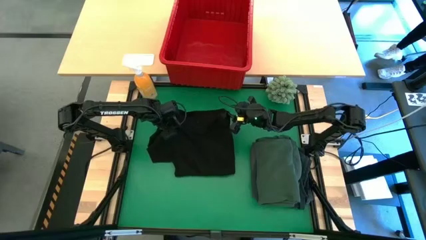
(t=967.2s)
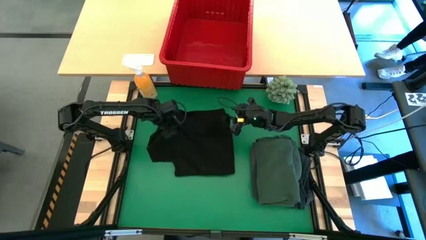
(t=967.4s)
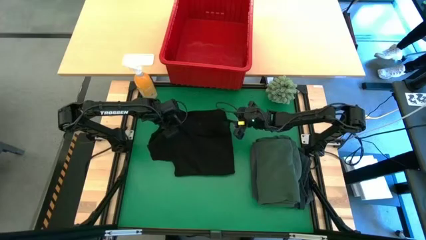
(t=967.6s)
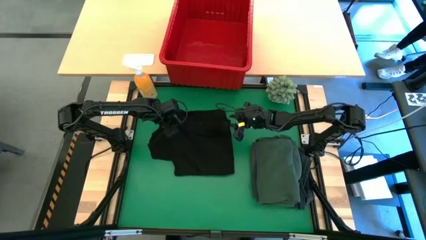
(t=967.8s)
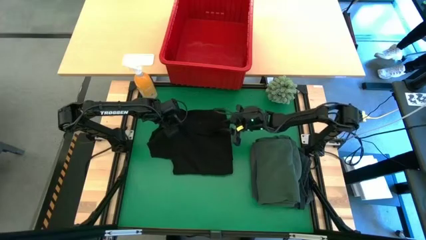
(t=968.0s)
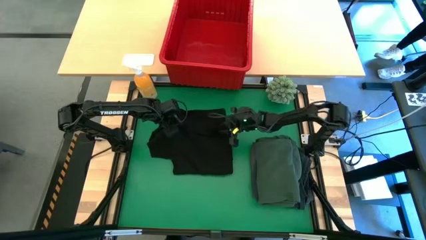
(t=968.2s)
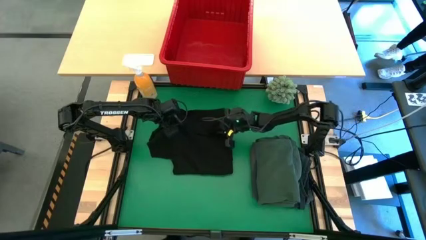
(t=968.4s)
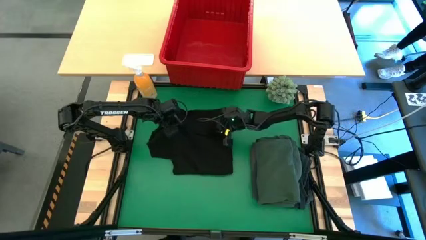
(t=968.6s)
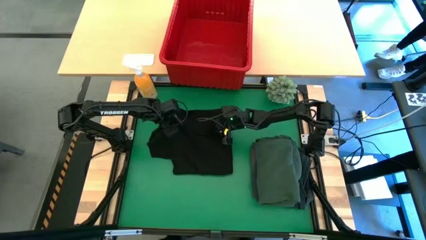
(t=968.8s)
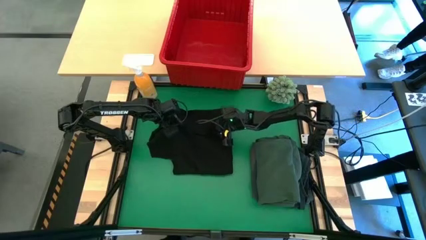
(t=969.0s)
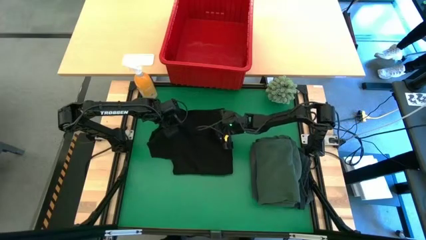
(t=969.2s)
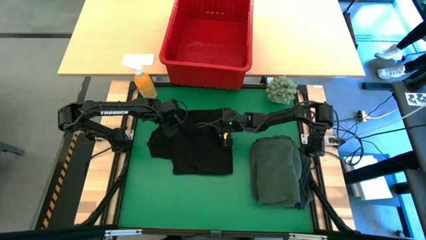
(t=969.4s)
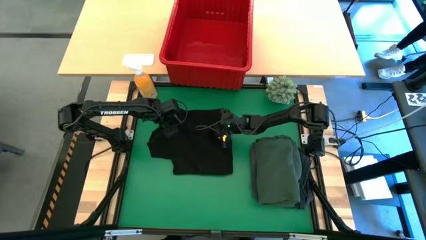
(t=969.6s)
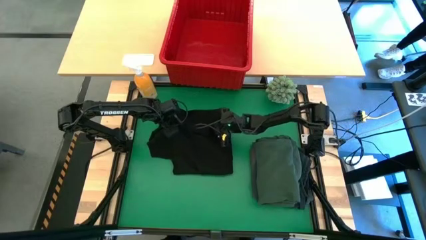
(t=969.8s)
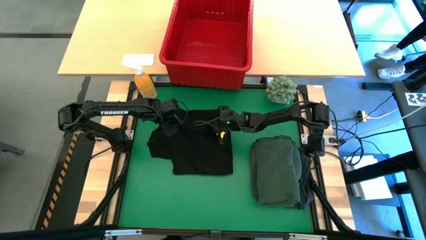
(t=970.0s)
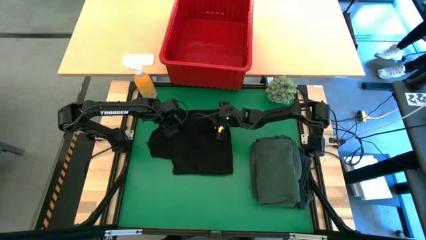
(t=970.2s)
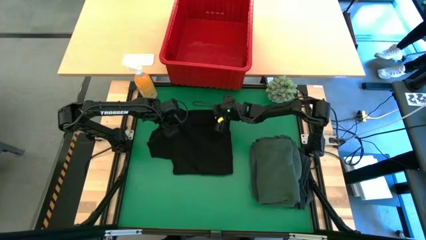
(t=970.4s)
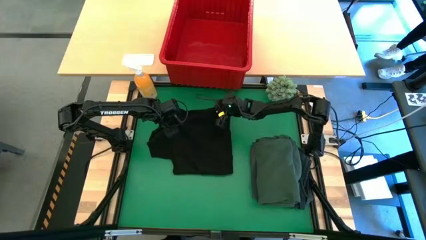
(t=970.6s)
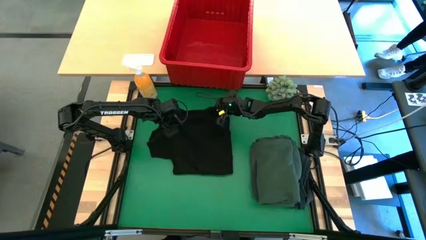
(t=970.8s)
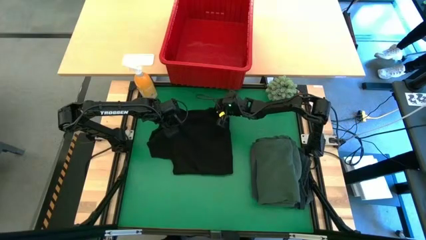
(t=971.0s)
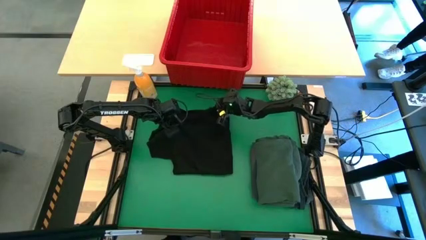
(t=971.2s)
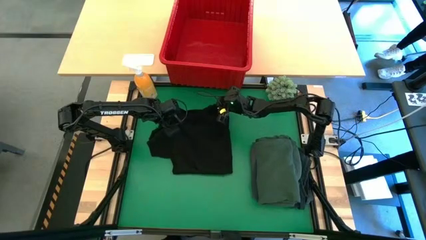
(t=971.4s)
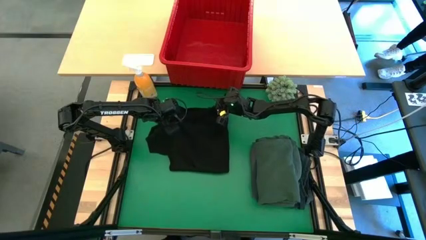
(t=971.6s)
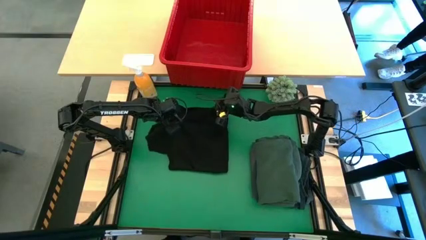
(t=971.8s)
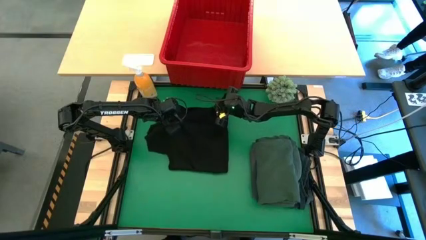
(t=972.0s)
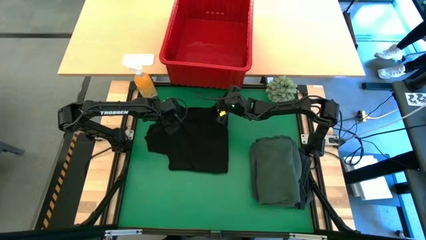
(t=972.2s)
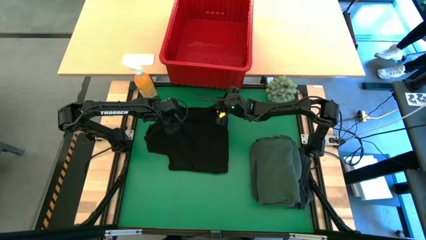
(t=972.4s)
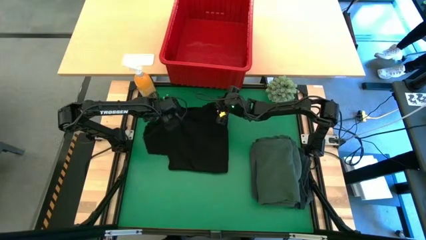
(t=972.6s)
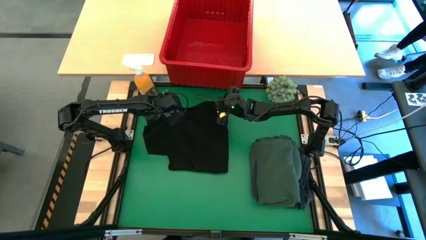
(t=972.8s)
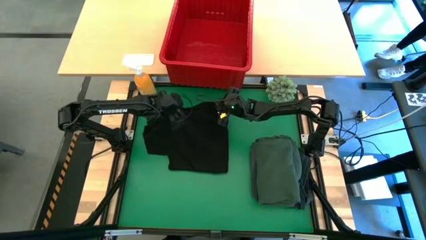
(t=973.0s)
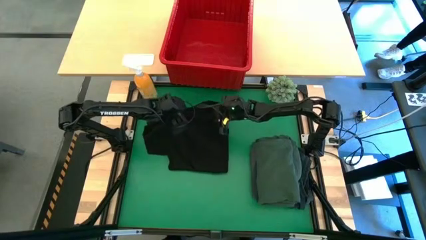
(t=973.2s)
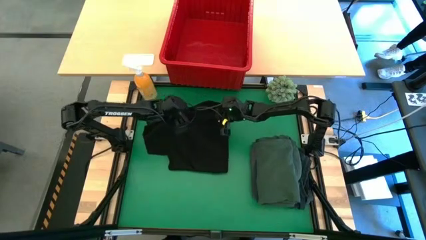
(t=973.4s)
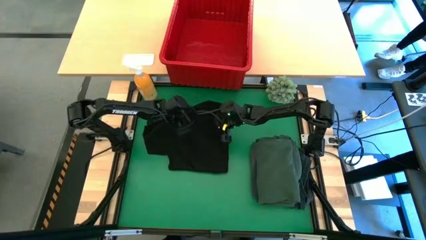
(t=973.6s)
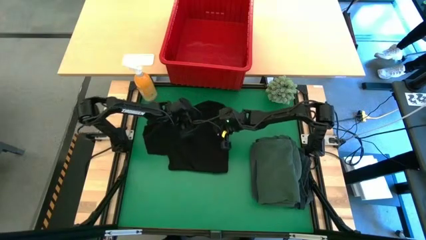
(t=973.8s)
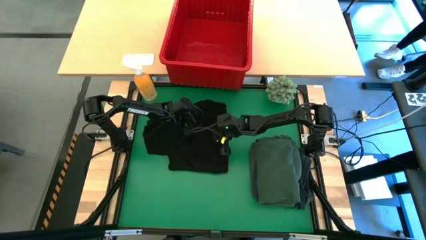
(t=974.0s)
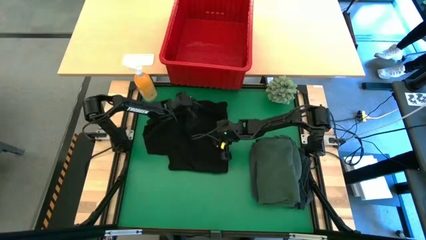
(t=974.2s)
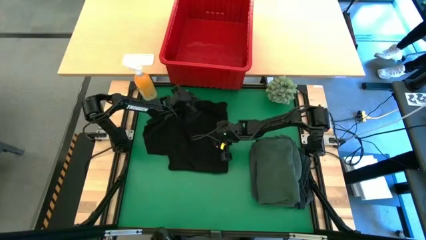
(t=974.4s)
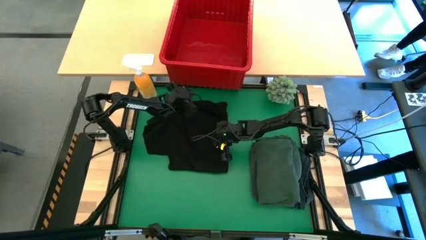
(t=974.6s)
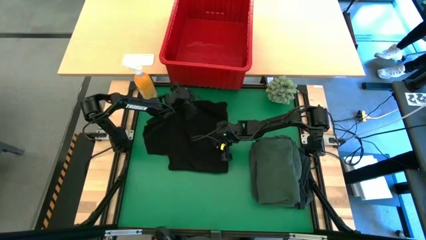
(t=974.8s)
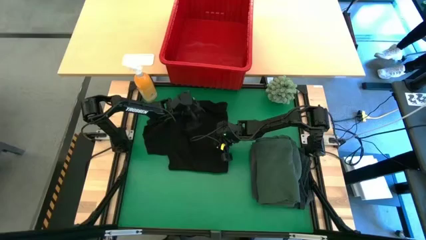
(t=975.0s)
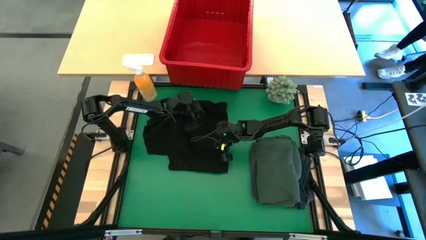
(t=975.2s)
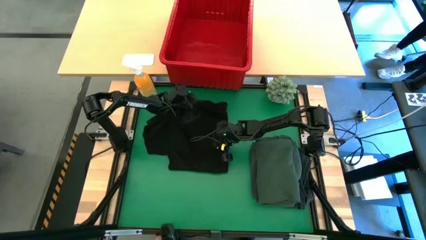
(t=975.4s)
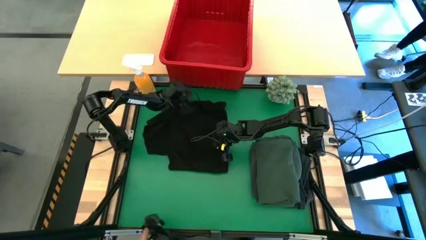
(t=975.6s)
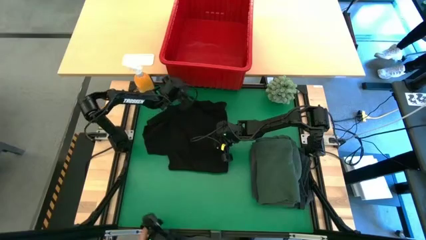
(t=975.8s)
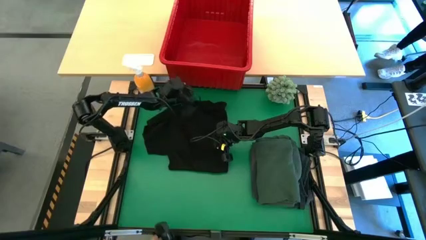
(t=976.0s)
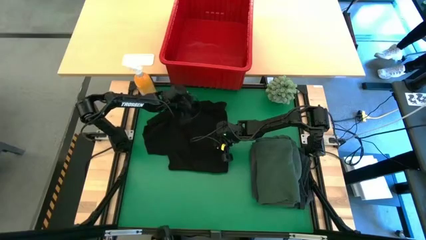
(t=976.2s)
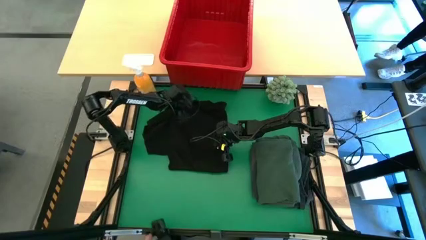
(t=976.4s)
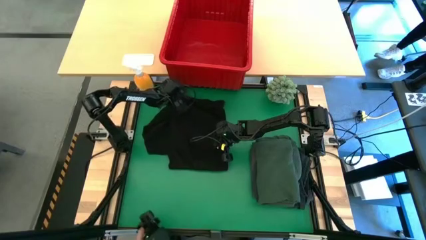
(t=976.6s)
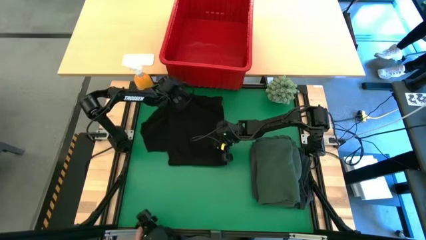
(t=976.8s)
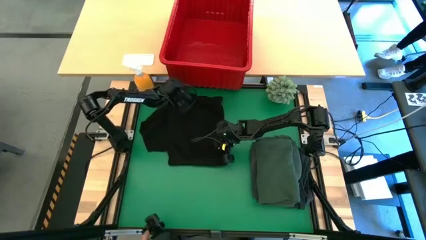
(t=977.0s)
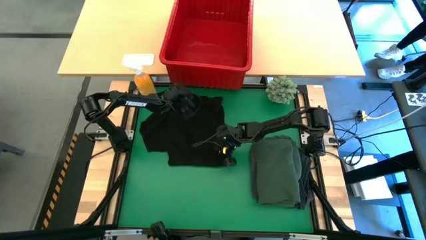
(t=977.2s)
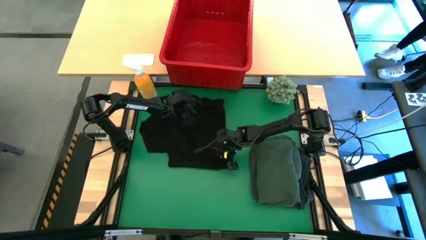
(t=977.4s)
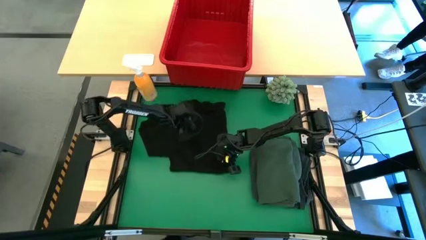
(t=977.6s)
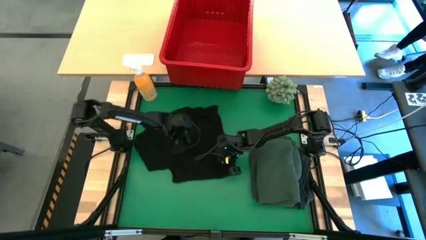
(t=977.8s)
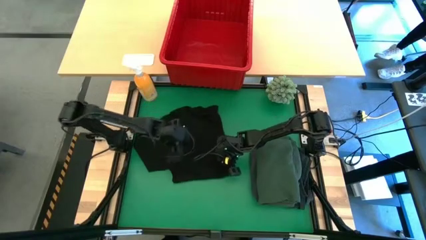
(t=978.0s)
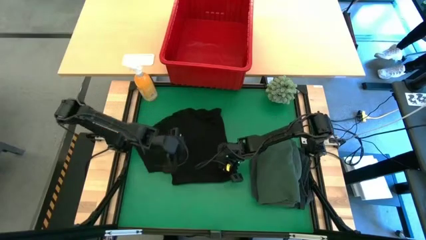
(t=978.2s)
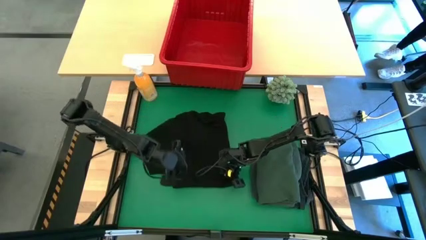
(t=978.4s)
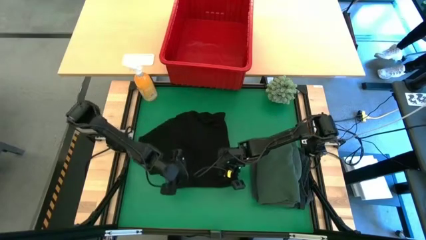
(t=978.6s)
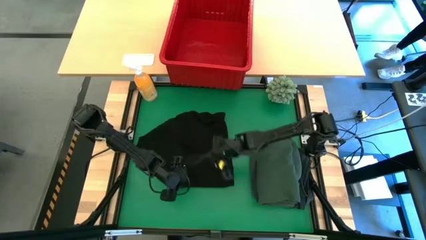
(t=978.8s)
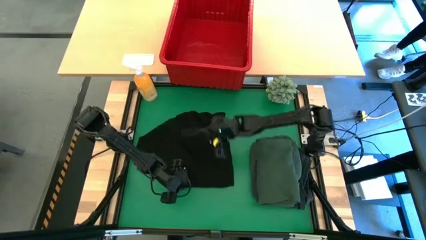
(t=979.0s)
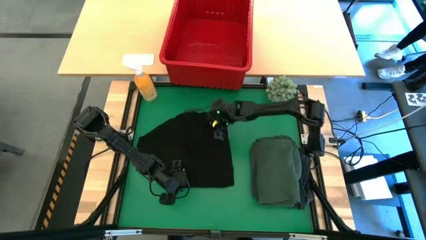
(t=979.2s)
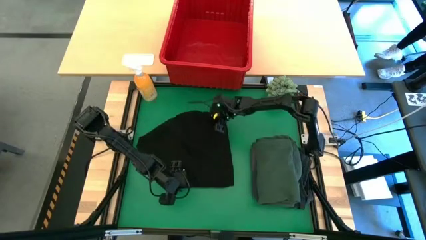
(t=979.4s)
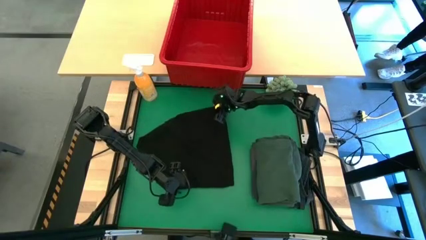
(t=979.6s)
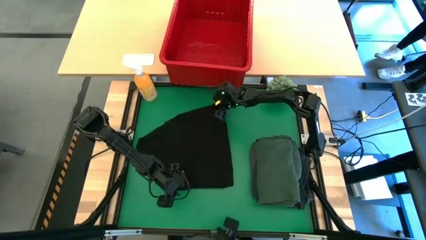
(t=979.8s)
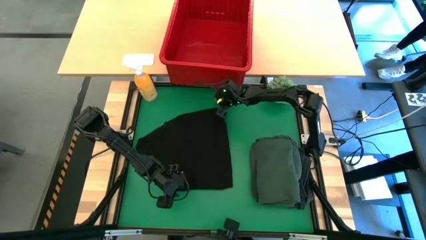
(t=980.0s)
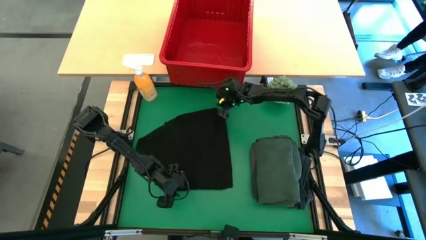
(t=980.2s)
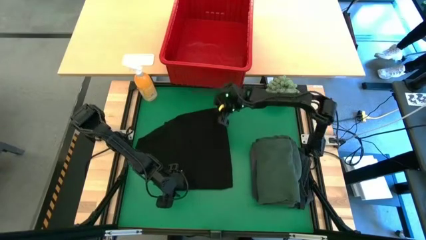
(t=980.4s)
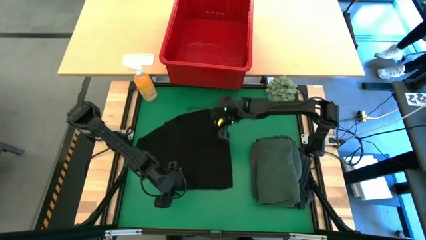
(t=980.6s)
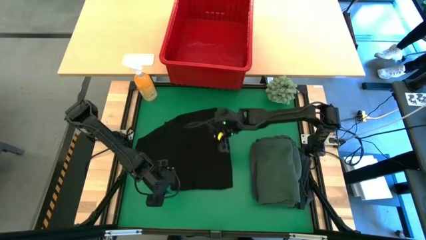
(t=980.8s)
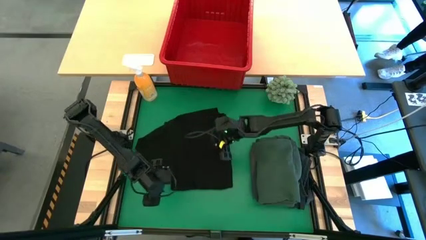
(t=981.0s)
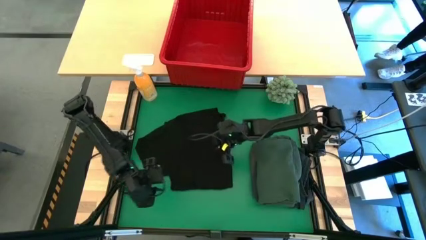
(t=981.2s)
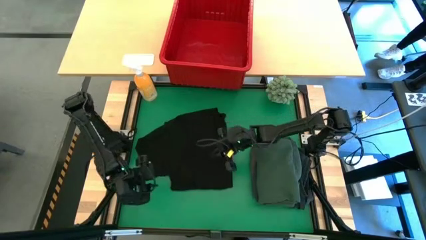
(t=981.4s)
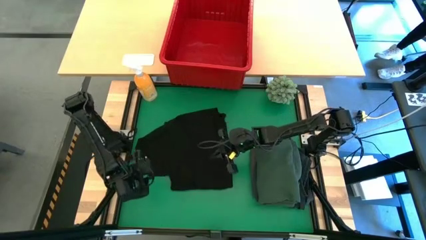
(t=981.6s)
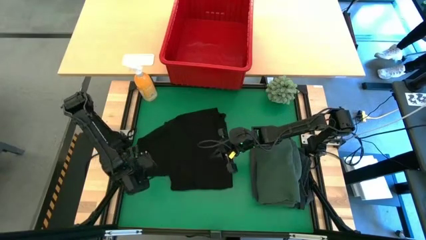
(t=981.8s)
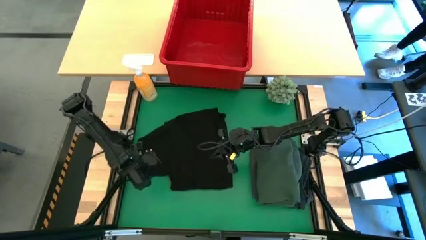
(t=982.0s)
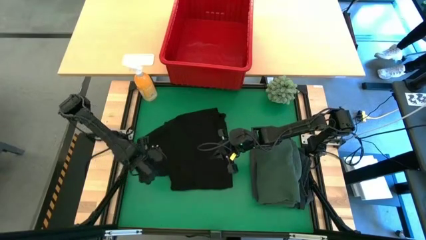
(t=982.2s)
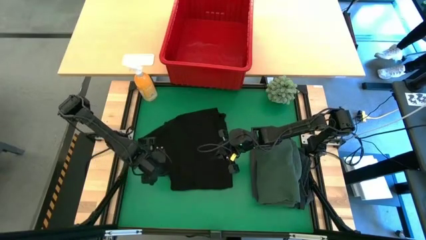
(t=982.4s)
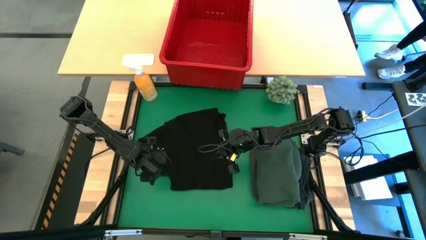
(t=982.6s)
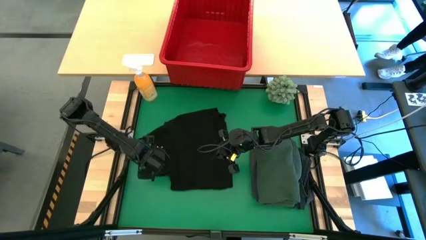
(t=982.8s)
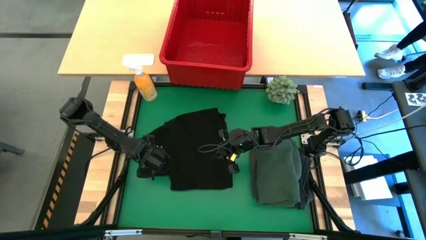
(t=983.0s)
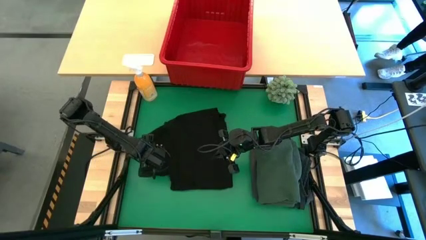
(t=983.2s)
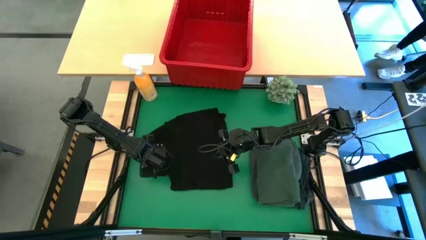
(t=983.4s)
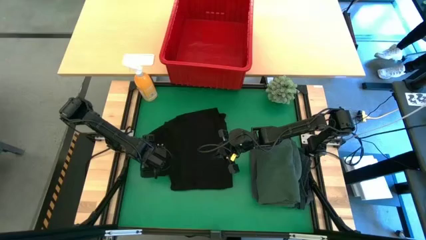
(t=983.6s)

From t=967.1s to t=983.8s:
Task: Fold Laundry from Bin
Fold the black shirt

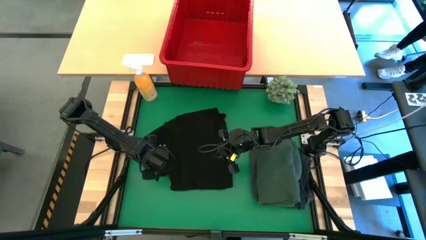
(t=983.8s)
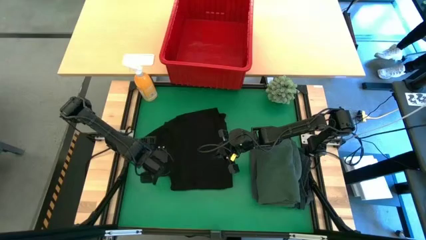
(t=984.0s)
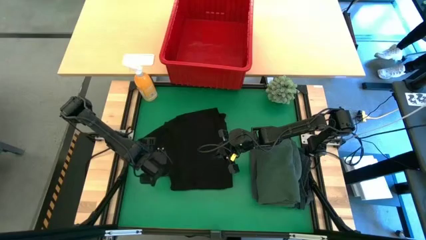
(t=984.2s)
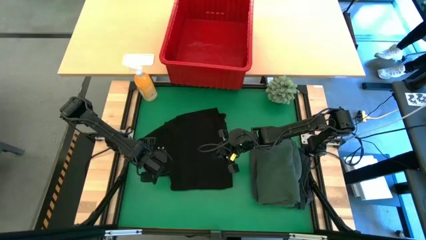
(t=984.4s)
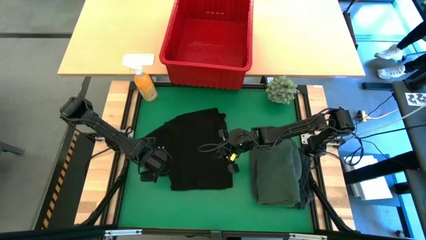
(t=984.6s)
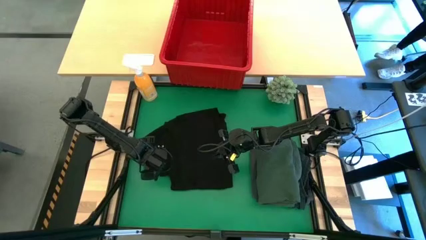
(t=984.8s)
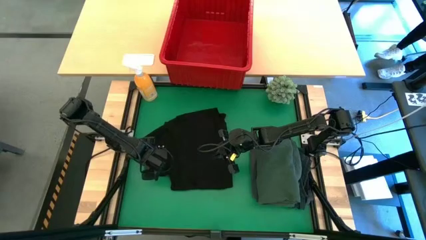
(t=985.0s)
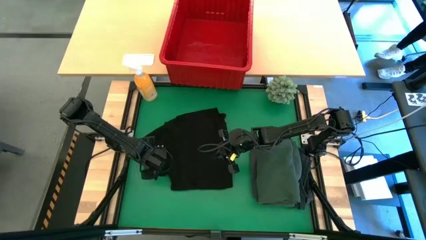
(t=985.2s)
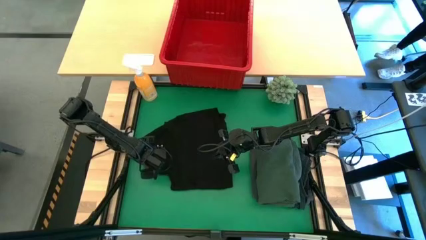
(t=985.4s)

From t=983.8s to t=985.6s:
Fold the black shirt
